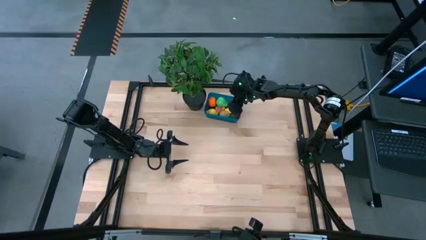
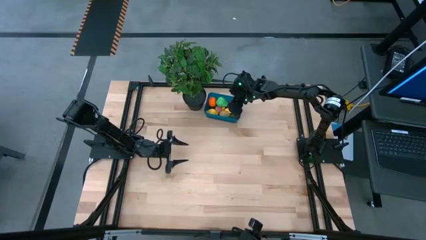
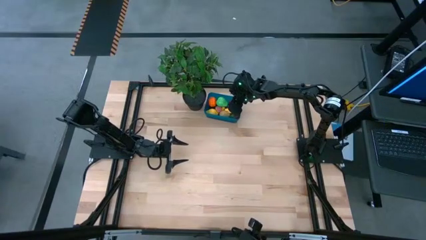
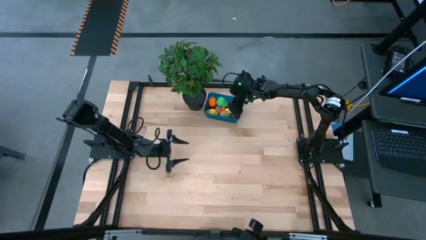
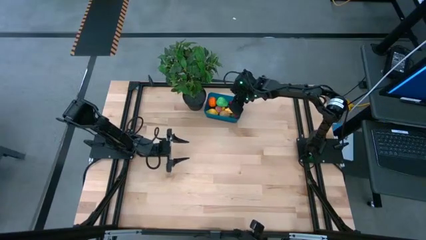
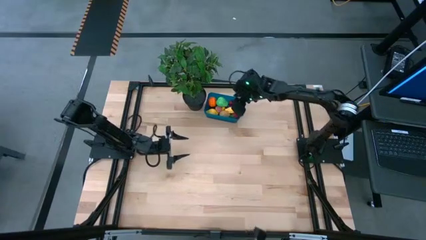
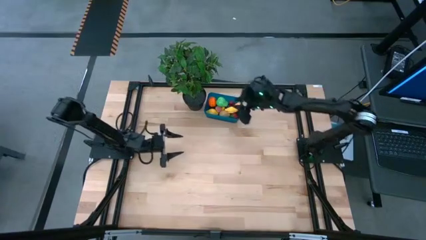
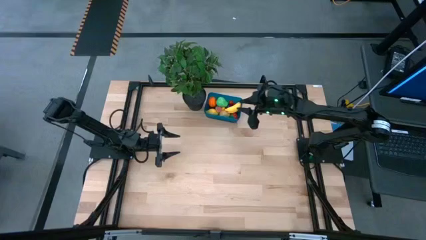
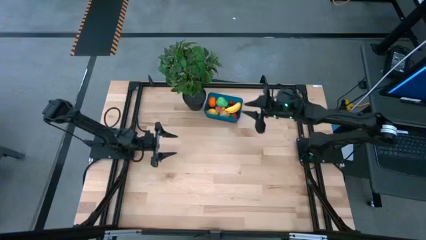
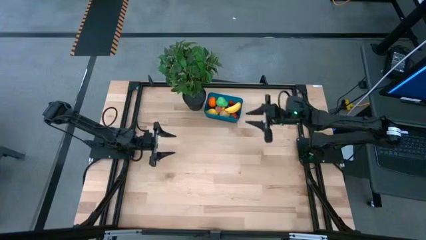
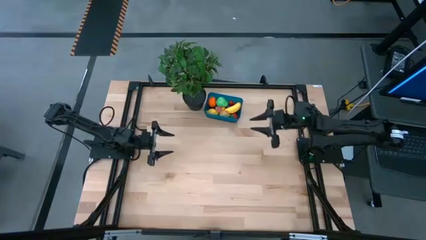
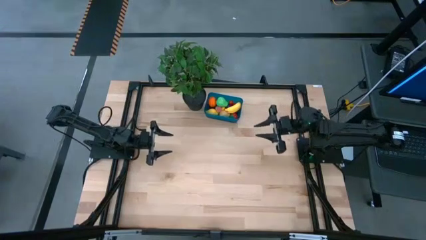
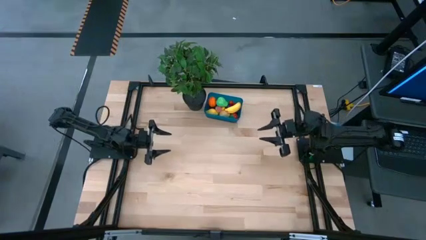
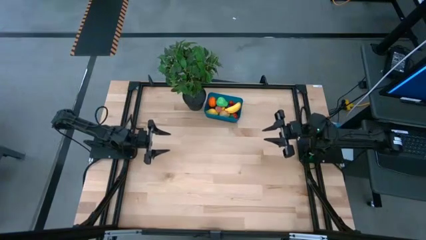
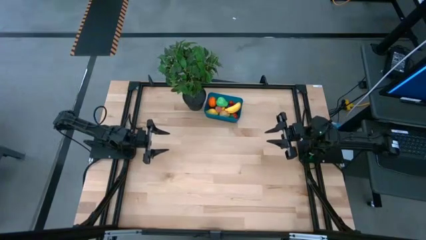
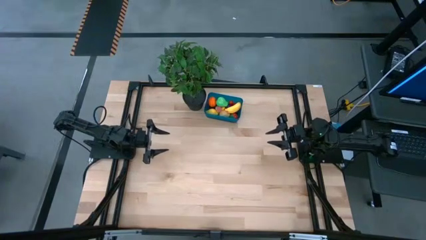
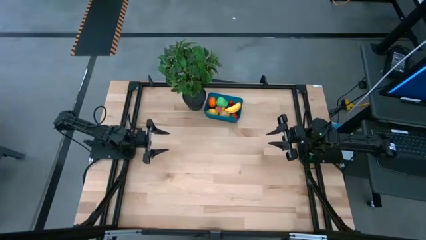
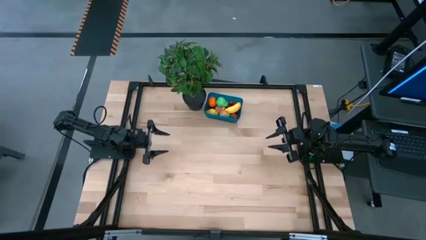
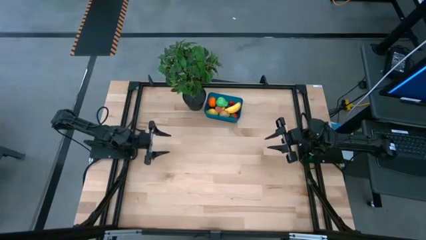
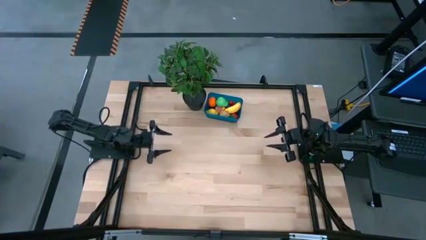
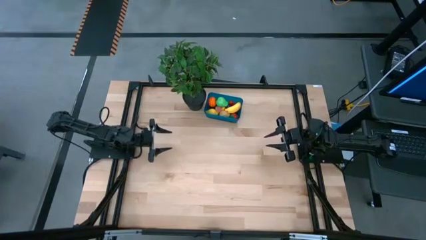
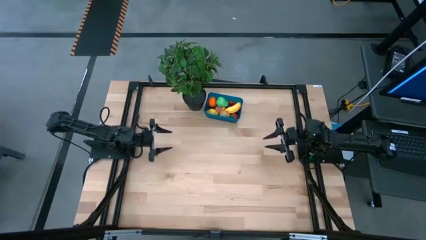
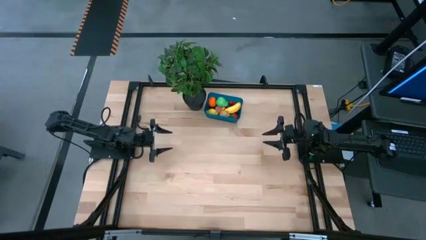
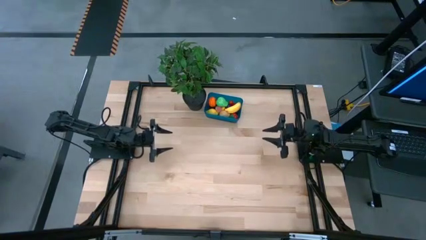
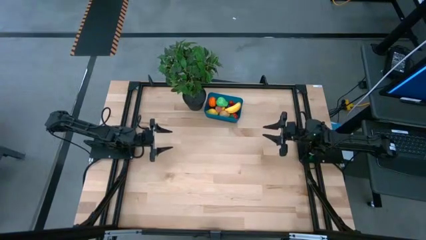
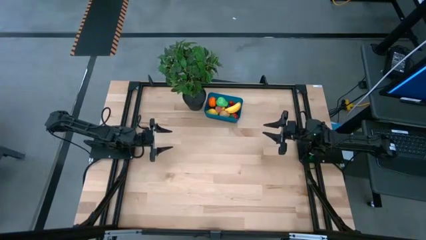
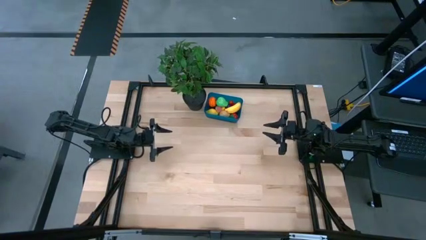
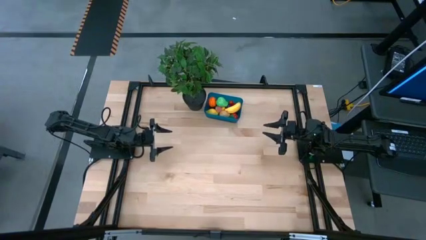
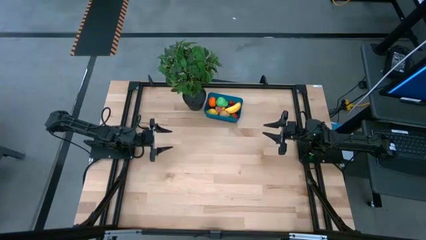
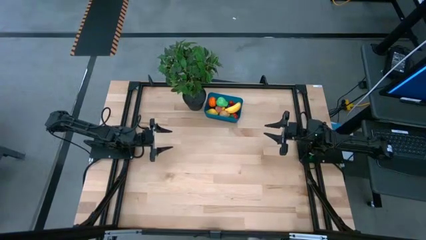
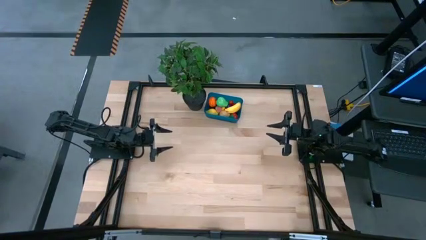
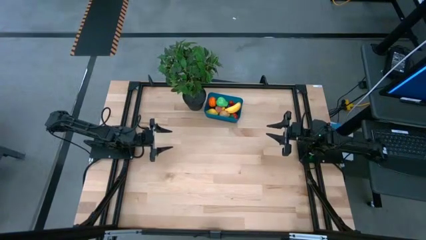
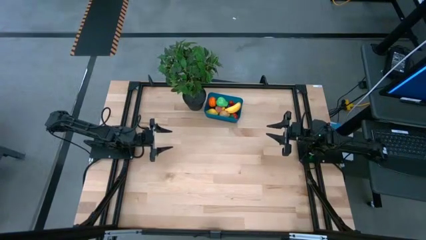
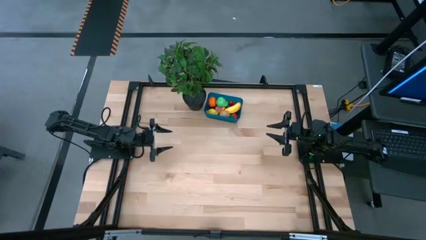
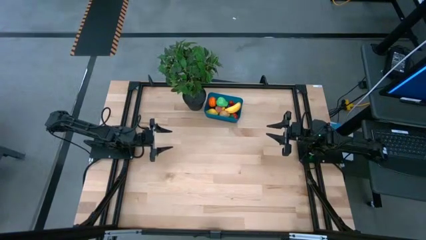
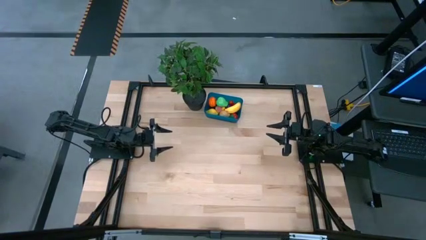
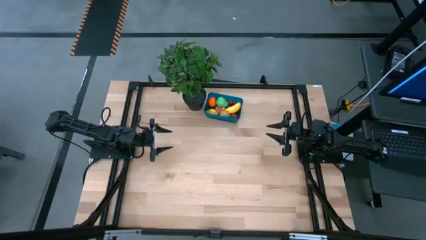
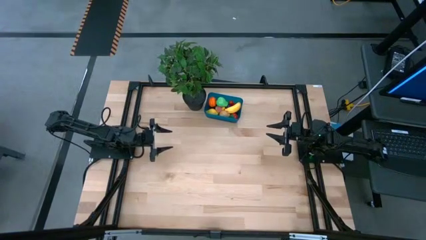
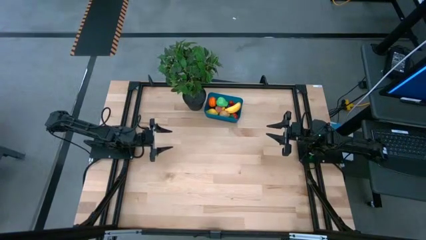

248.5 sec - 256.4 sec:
Task: Pick and placing Produce into tupperware
Return to Home Position

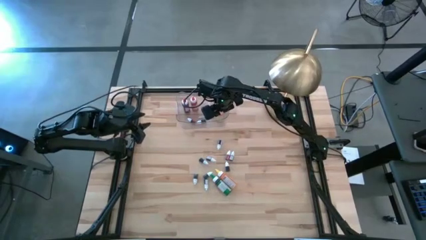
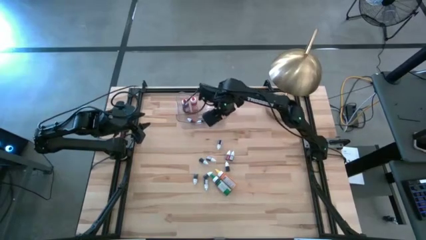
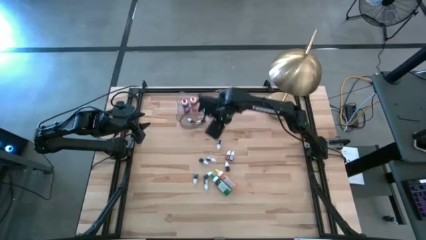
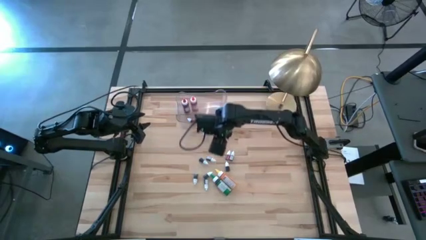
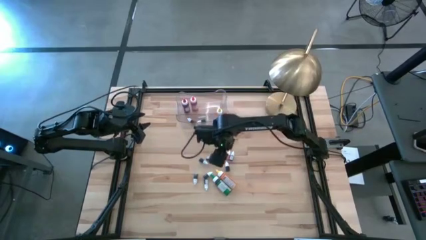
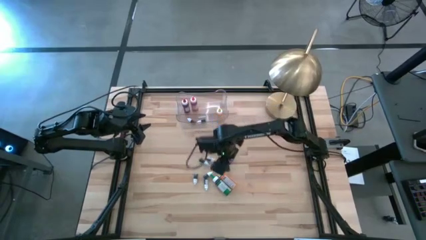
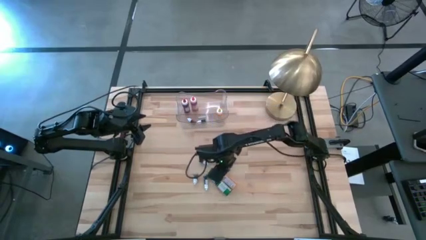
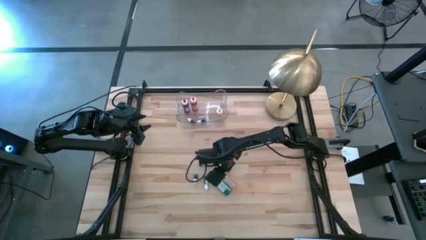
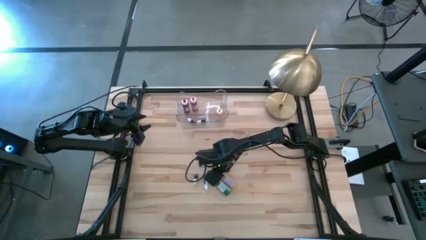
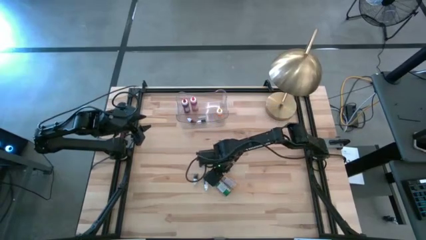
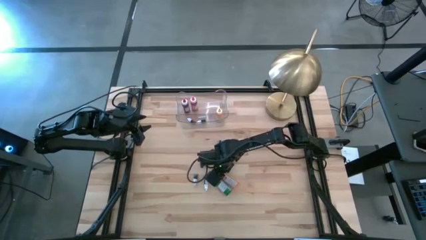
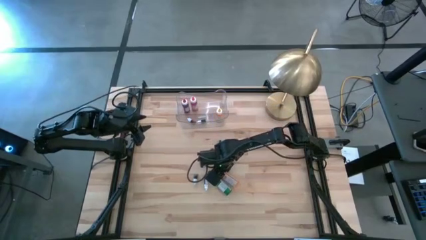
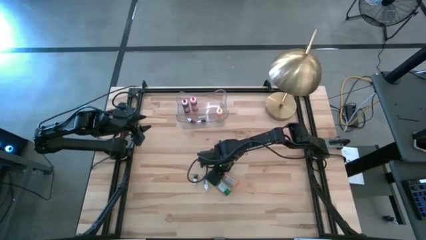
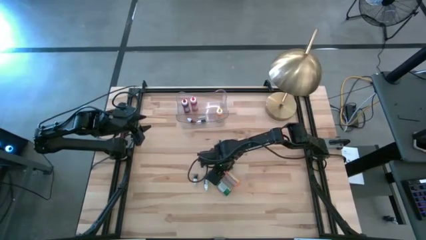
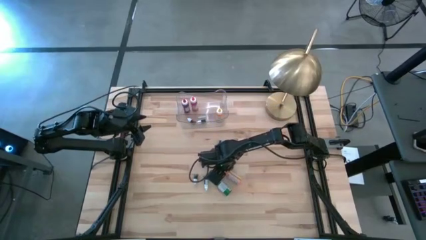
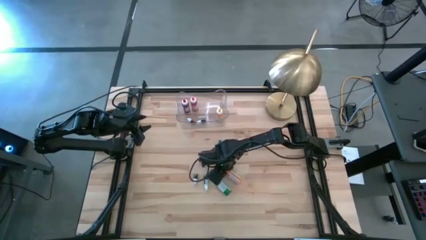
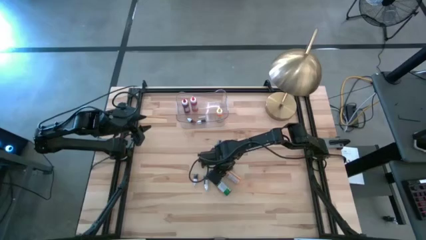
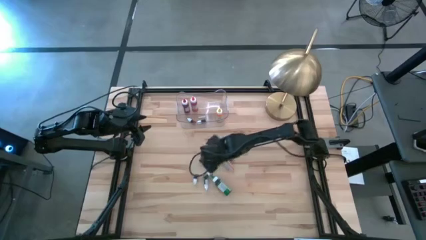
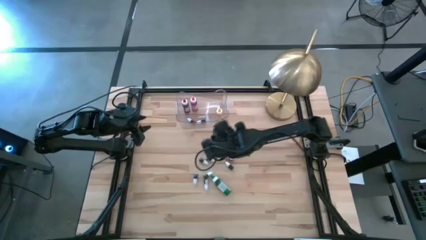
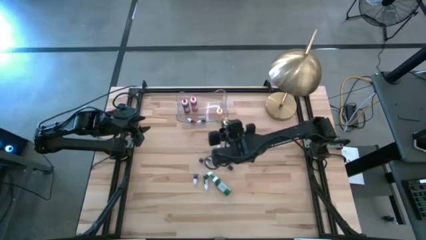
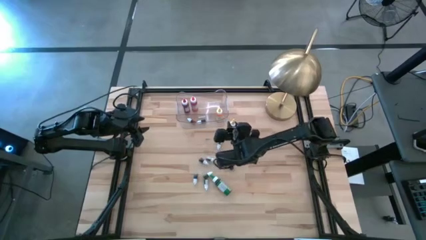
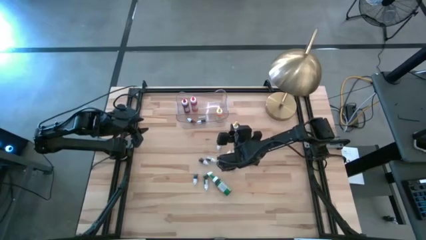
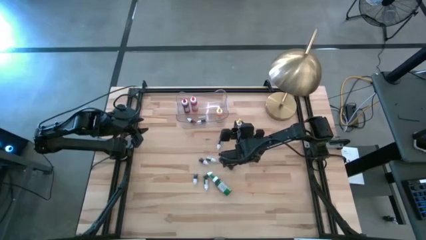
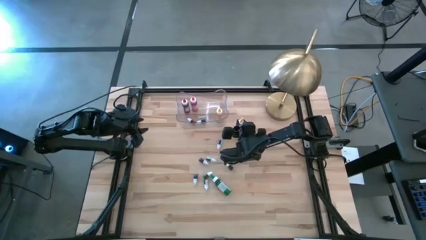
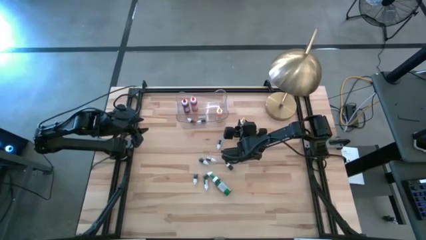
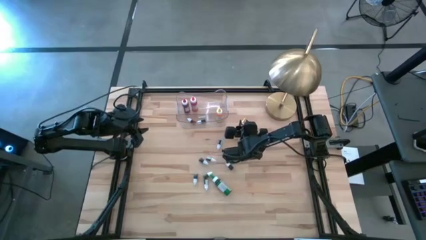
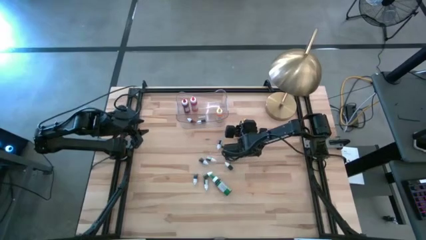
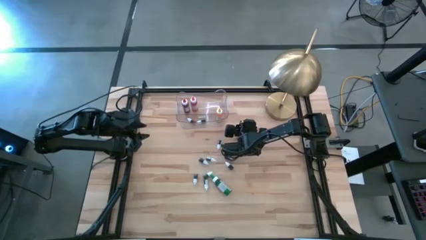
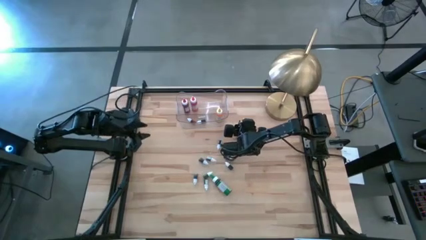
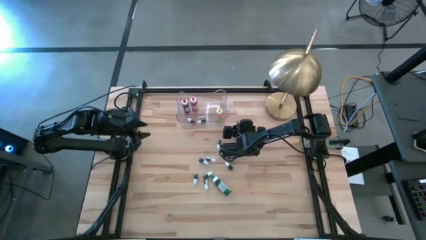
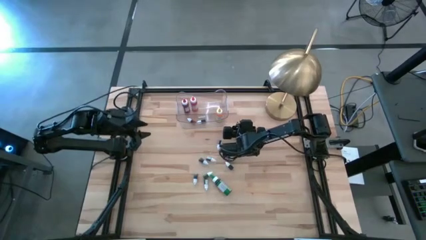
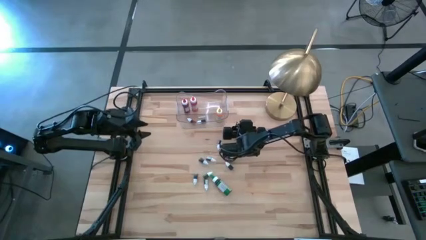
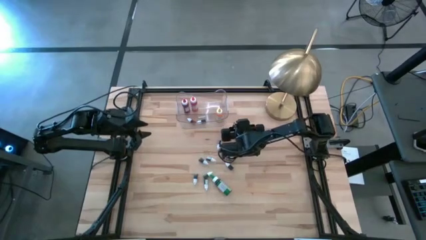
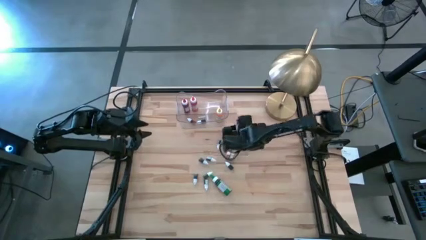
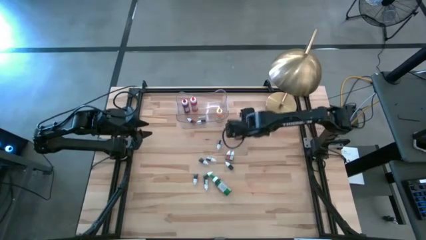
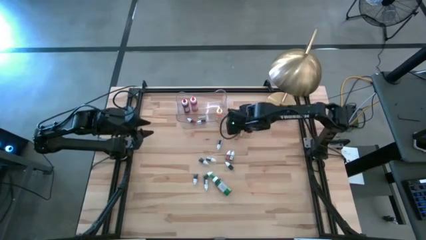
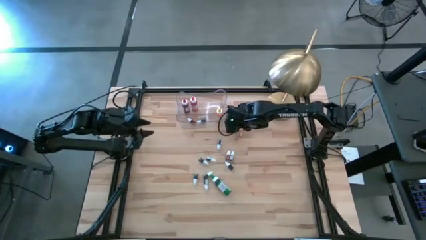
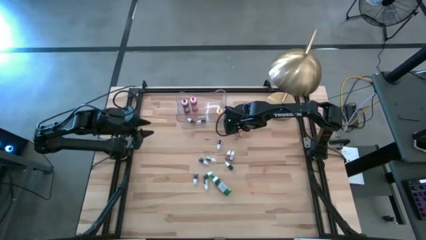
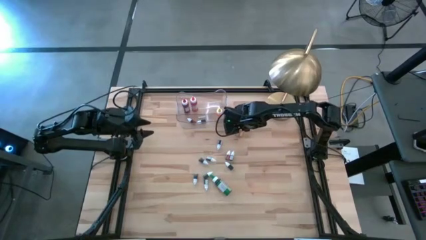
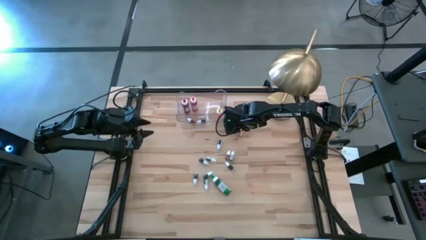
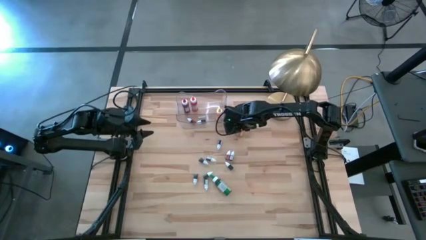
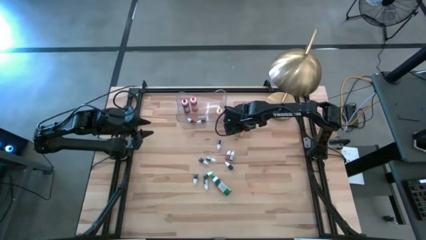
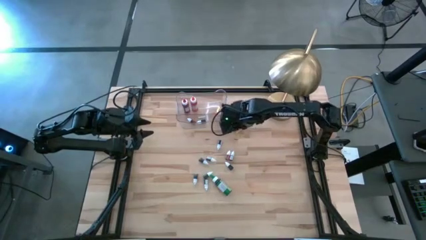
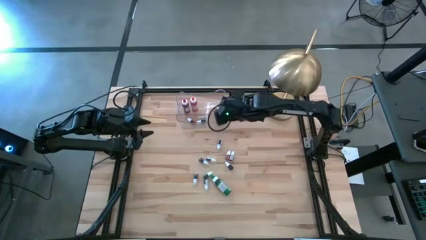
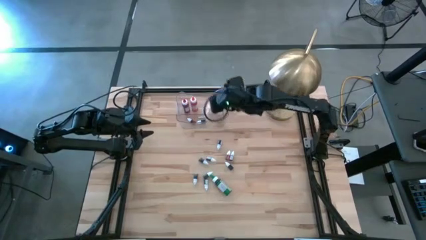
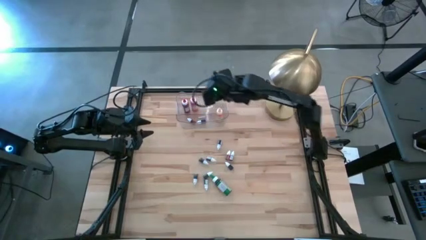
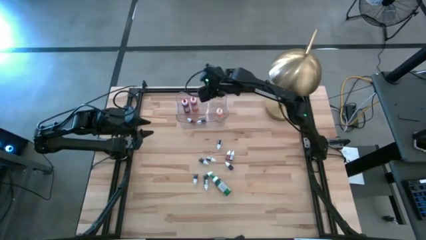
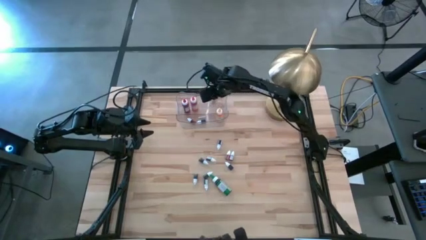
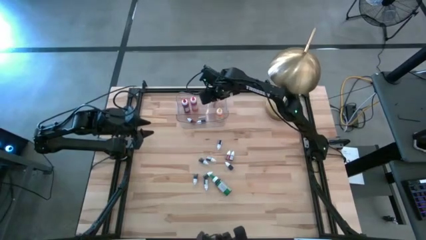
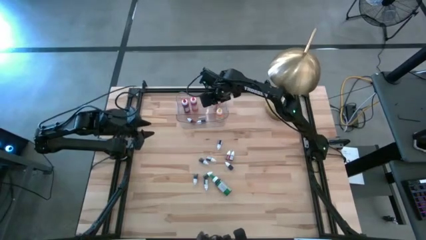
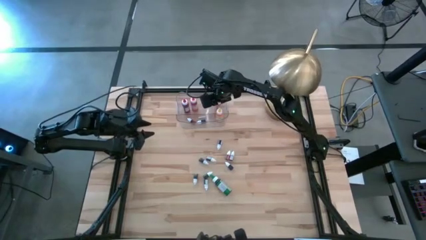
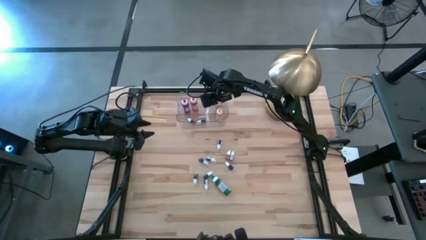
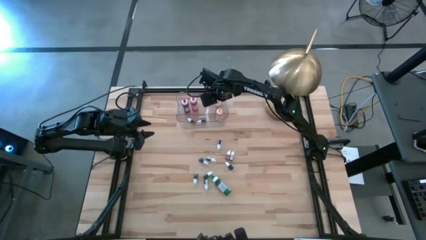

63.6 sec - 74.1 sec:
Task: Pick & Place food coloring
Put the large yellow food coloring bottle into the transparent bin
